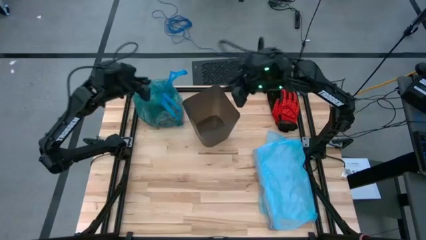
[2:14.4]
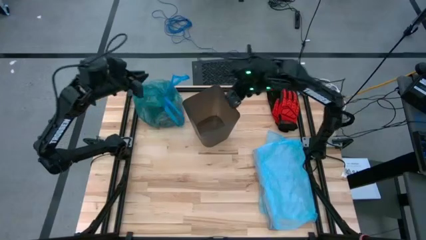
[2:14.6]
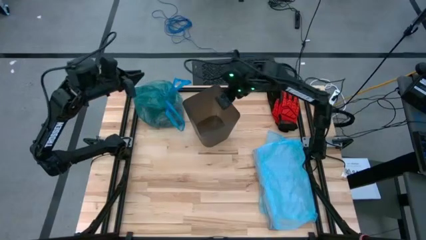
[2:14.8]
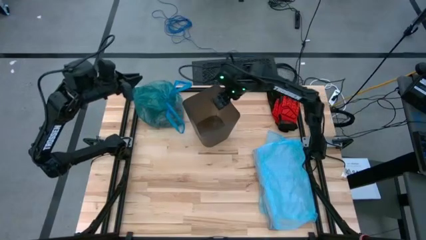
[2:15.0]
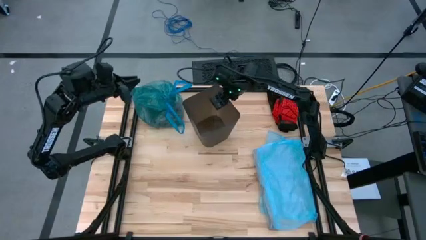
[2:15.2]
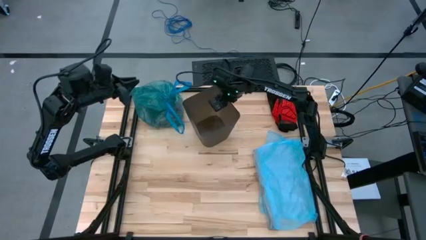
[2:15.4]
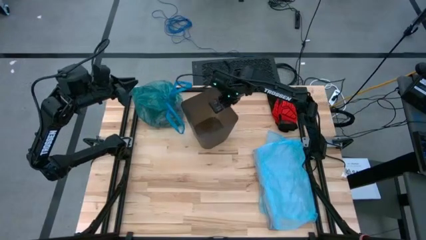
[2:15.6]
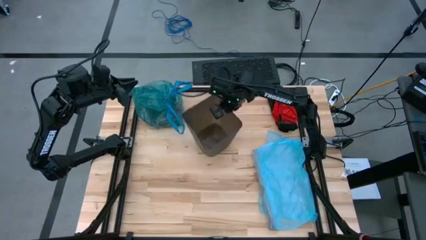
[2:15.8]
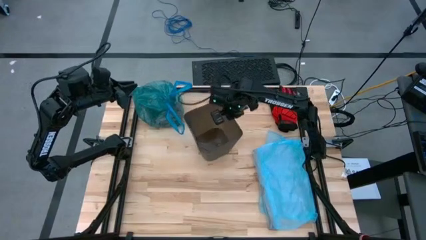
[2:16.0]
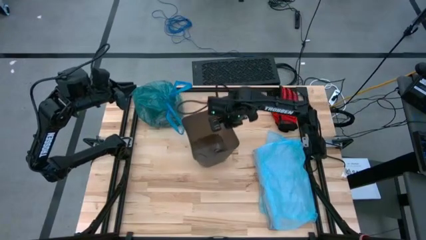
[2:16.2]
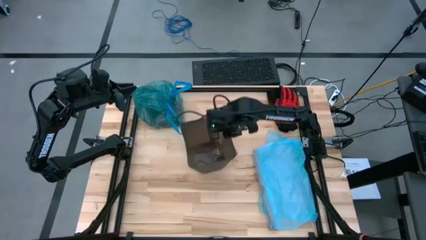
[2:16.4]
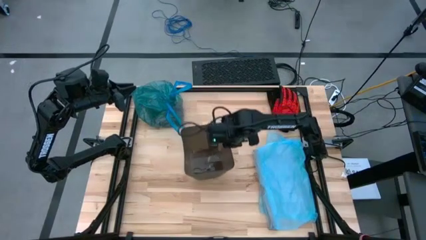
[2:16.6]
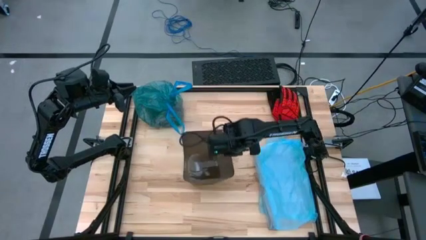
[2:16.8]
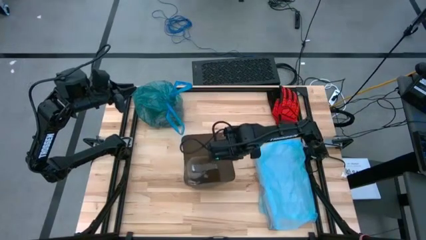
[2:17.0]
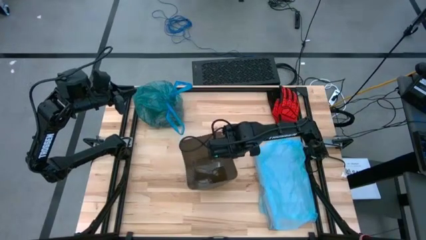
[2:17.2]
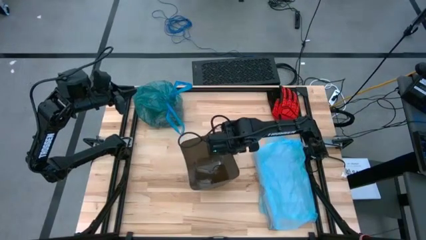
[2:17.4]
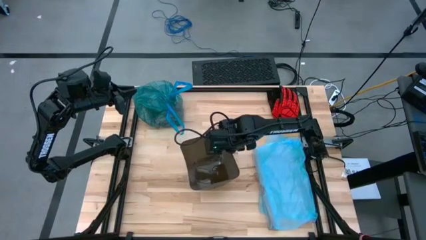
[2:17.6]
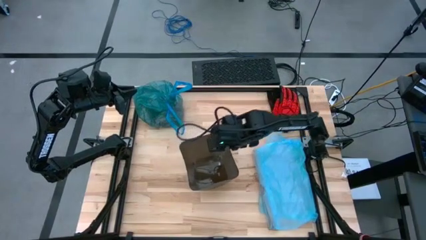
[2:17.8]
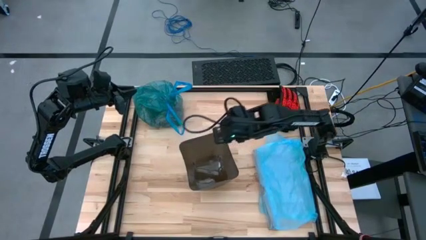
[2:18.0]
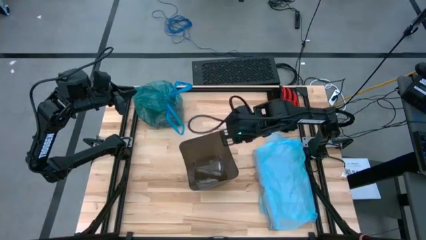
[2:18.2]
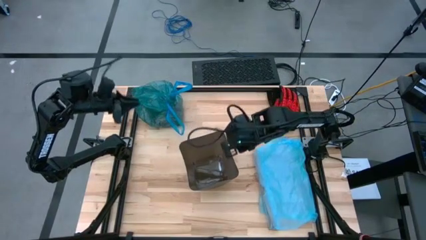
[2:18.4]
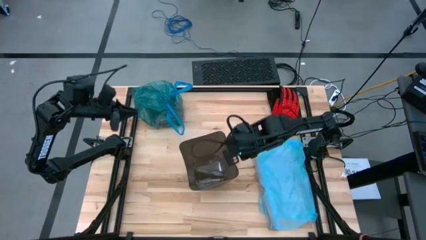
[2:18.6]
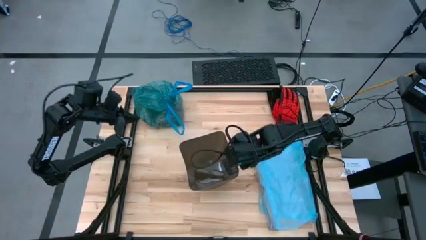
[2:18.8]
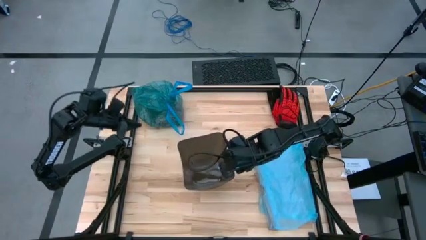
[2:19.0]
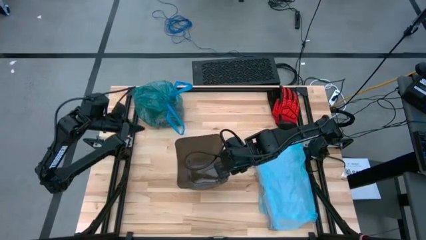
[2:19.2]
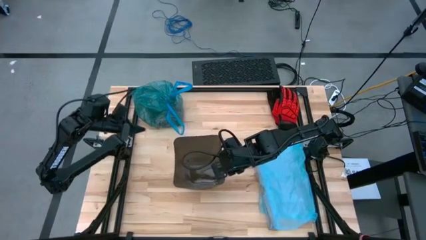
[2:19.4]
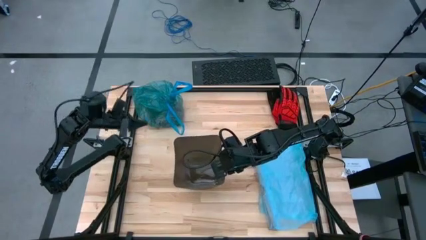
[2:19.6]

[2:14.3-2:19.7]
Task: place trash/remove bag and relplace
Move the trash bin to the center of the table

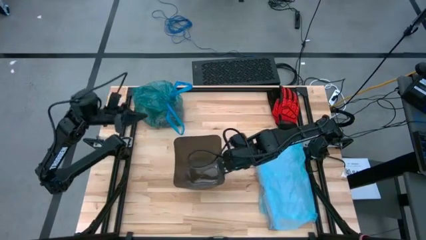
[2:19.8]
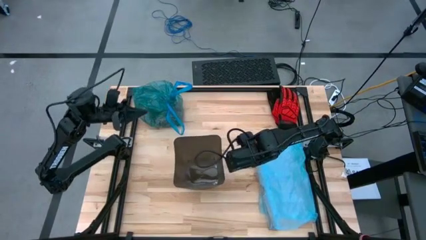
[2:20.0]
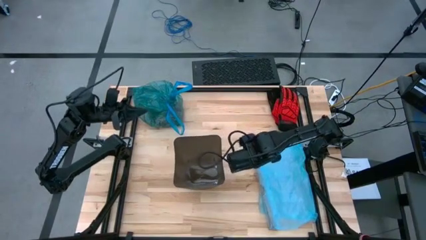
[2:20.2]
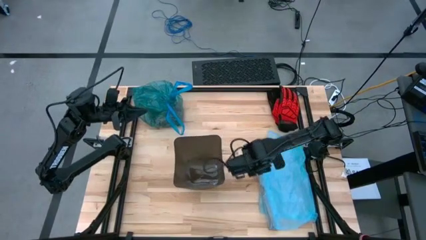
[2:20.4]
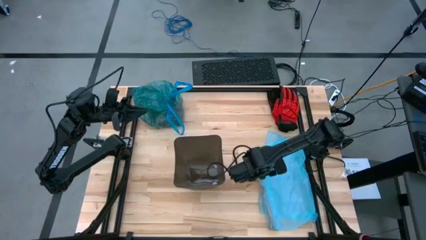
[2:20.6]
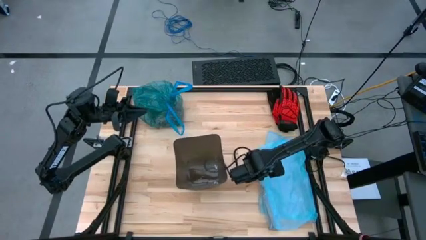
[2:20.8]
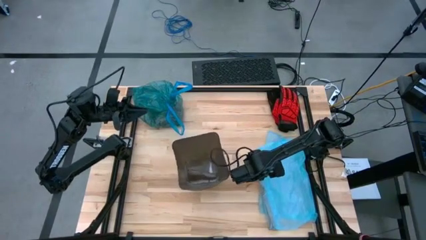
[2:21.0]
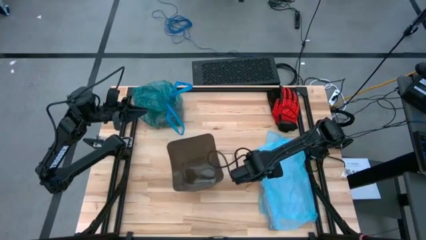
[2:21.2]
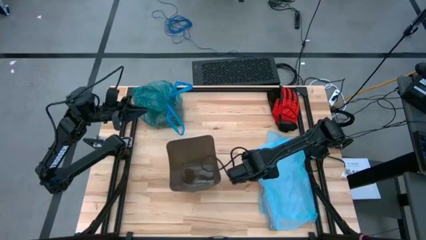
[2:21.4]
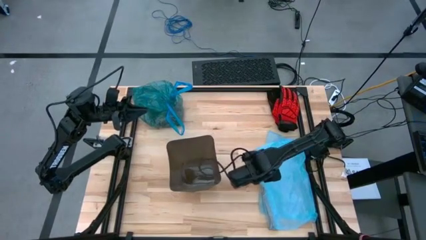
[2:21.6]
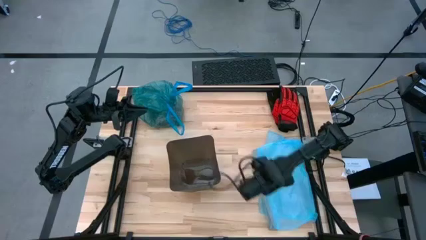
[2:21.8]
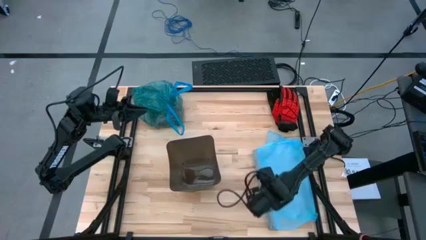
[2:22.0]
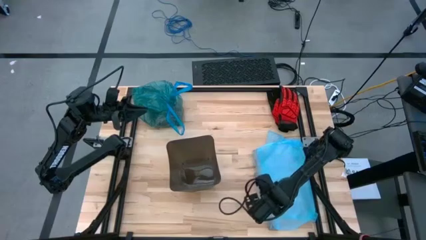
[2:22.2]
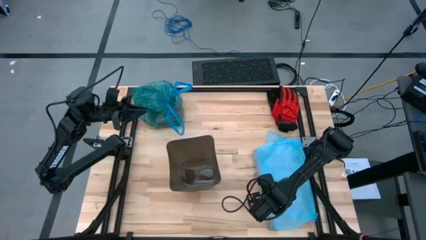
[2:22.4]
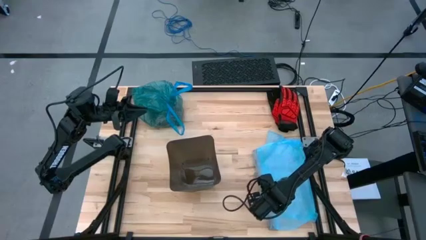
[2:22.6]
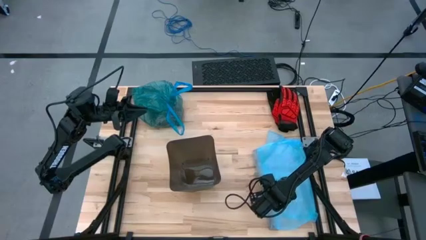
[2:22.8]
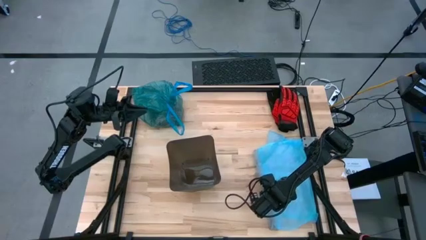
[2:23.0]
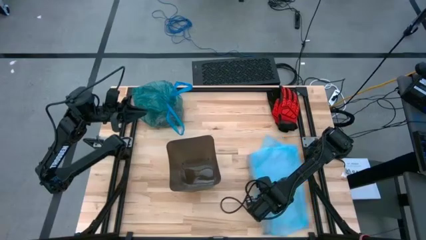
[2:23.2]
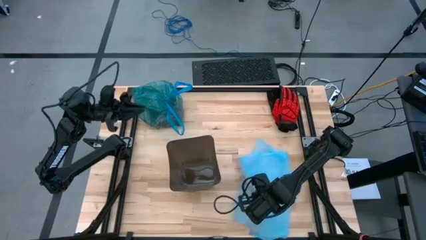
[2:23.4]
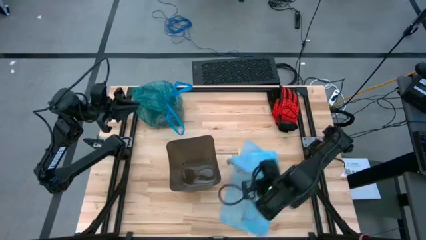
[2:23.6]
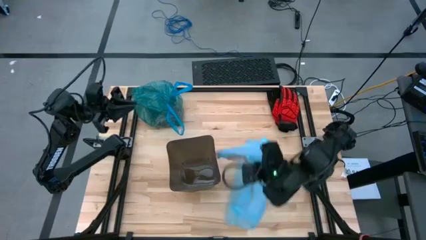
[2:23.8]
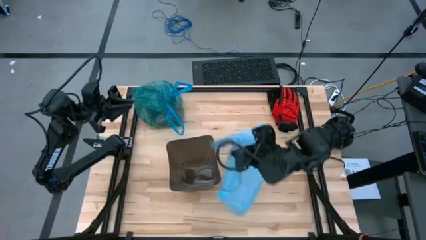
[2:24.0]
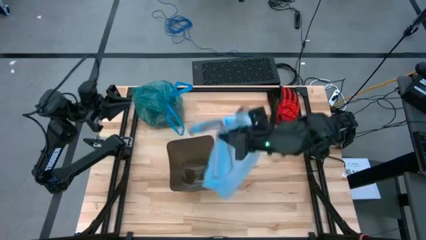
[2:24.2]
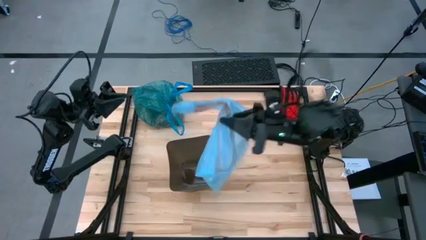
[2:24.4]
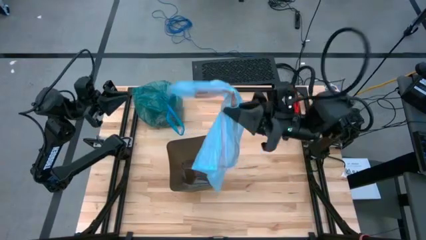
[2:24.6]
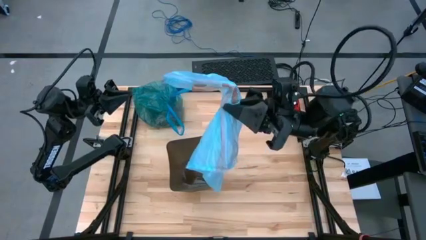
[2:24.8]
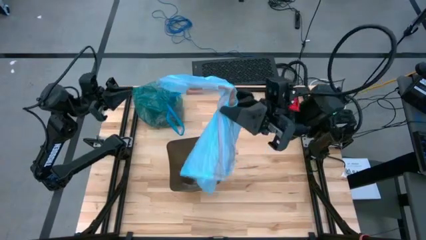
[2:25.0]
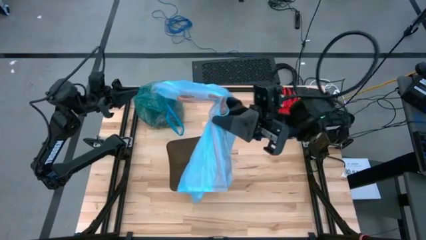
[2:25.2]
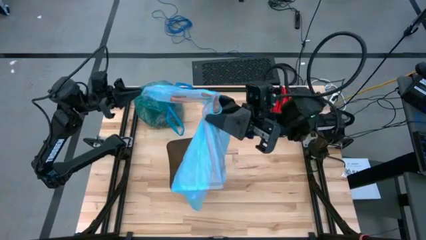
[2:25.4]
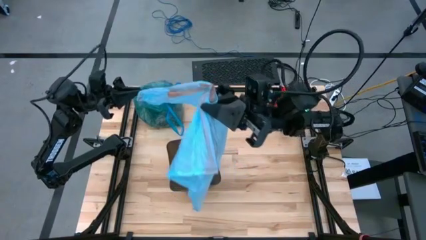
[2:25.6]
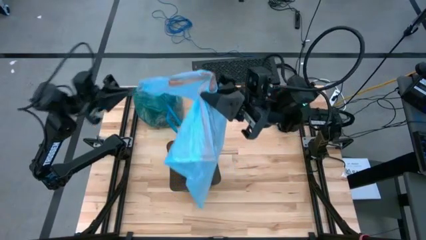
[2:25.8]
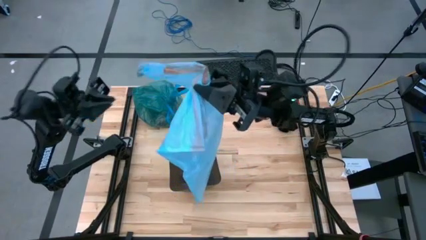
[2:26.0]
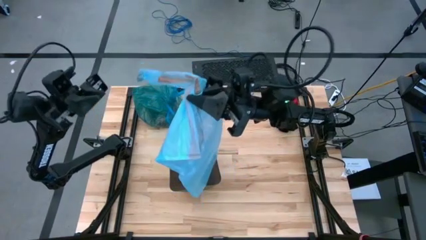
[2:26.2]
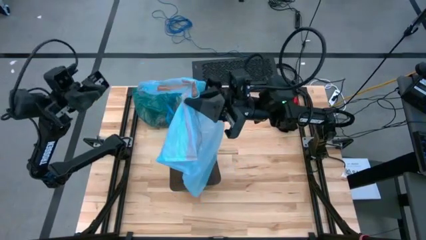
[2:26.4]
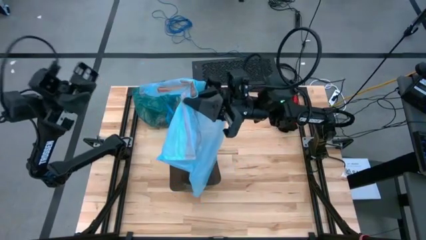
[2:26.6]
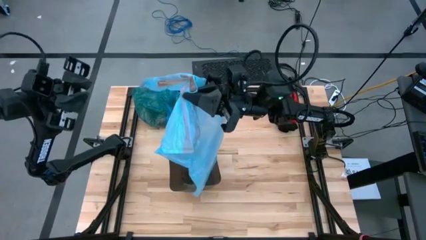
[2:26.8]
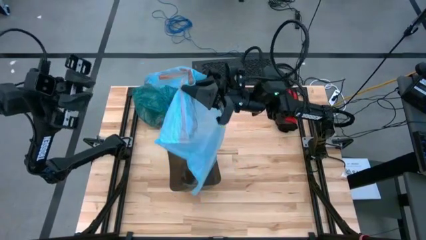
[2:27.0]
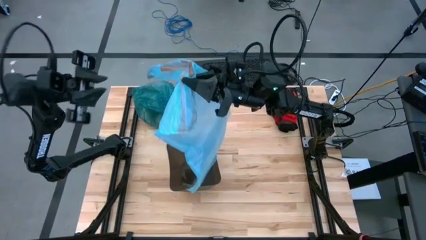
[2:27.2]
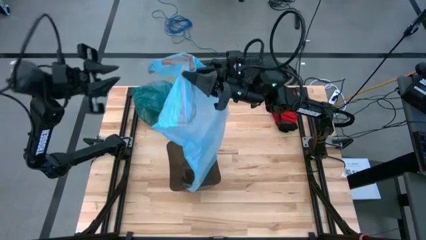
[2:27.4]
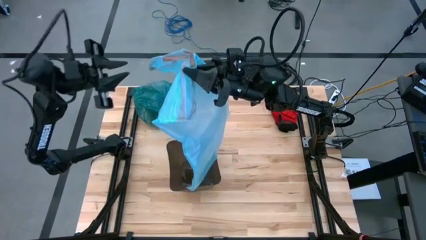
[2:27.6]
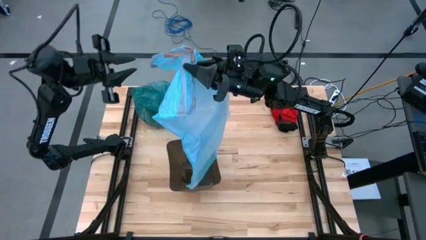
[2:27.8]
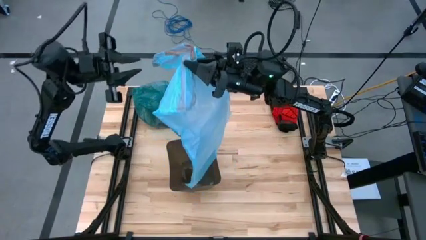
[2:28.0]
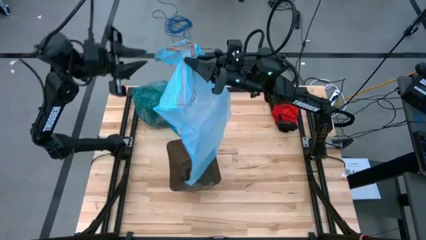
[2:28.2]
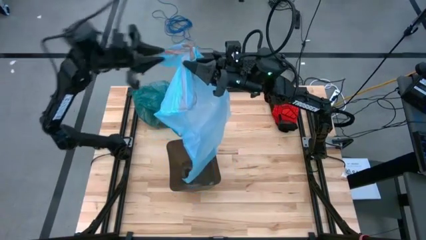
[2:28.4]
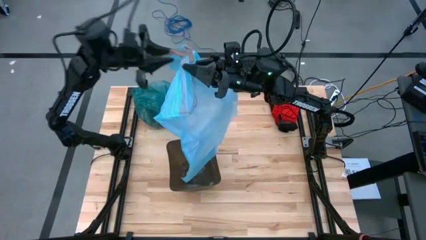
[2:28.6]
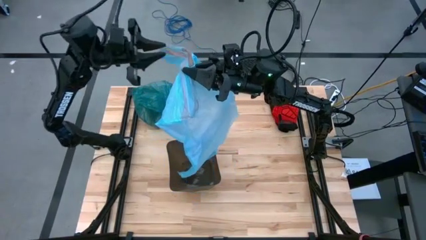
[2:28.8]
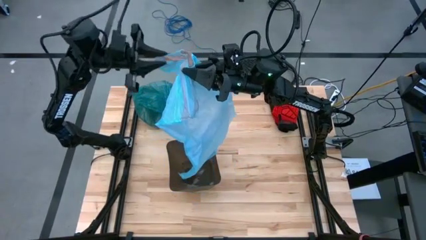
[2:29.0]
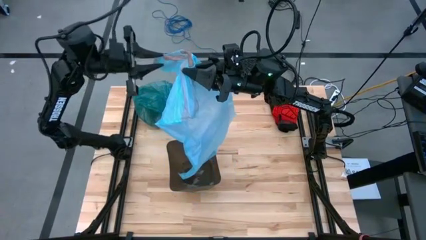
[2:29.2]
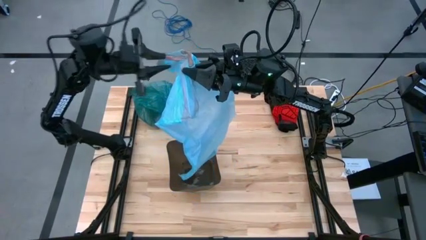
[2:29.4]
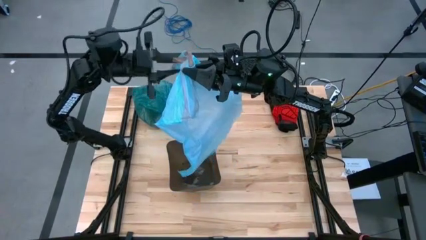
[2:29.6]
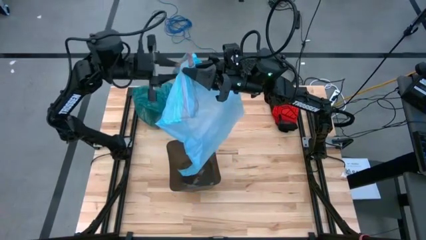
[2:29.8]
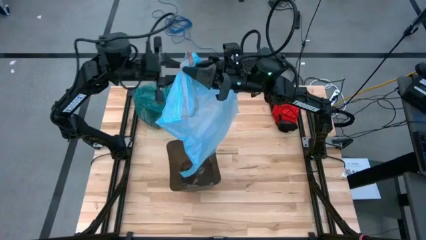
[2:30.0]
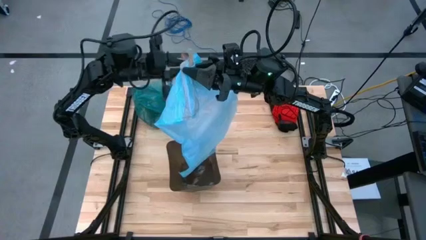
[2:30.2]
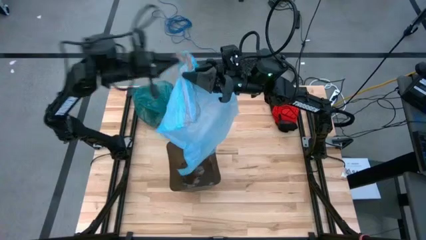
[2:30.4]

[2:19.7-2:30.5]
Insert the new blue trash bag into the trash bin

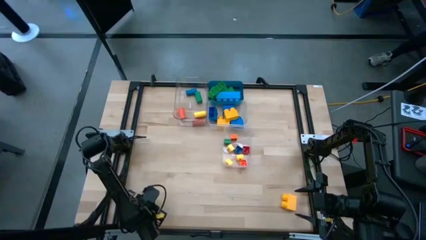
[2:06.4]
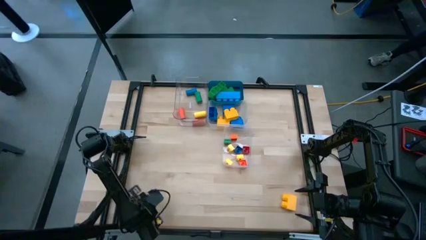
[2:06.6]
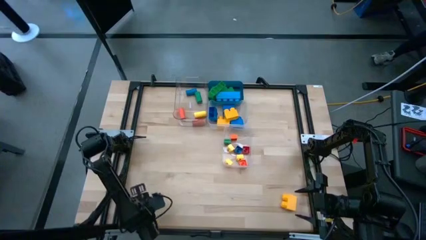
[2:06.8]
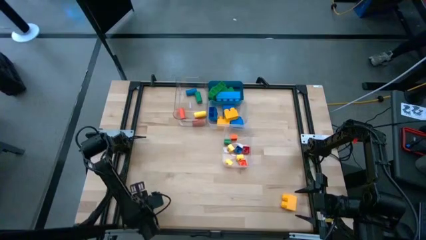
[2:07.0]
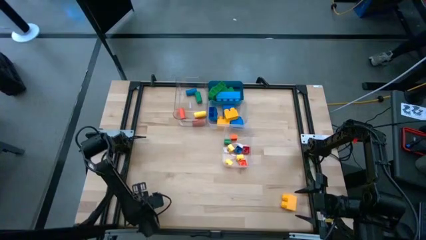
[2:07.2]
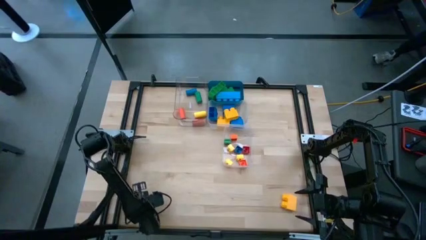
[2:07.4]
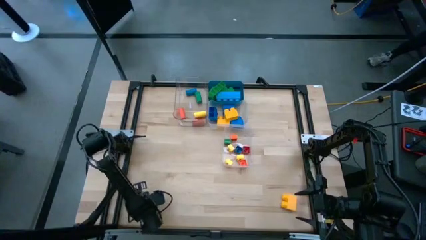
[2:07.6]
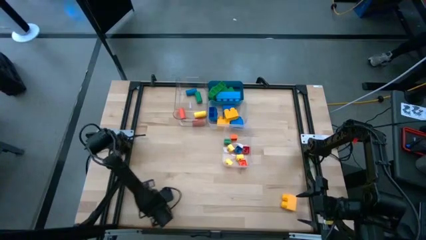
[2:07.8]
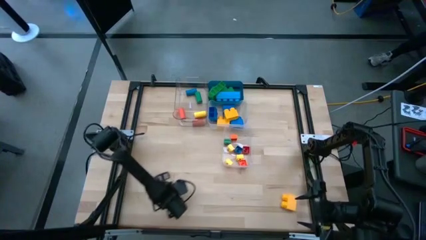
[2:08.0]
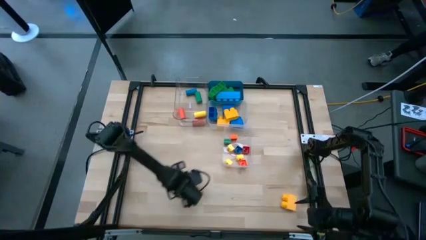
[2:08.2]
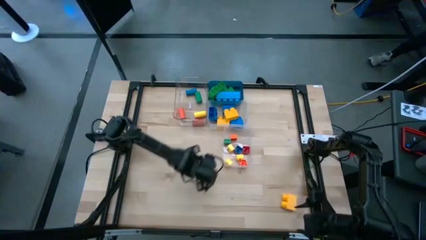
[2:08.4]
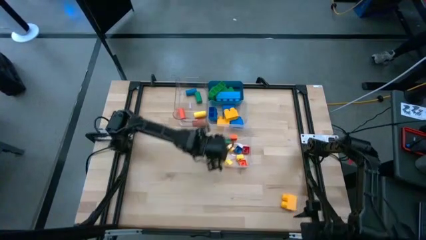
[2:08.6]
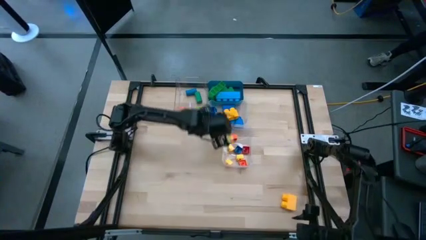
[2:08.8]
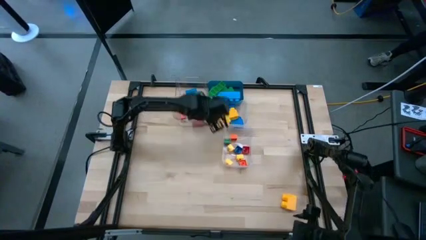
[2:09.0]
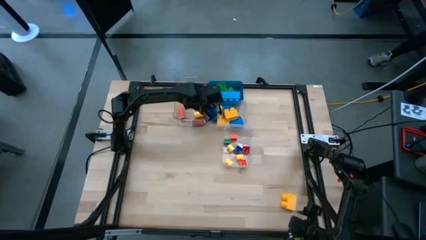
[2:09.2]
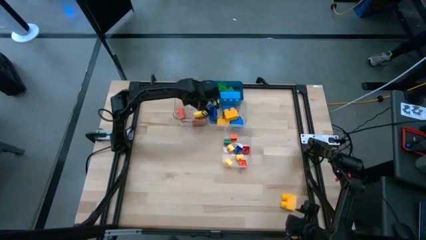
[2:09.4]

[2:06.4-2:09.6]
Task: Sort blocks by size
Put the green cylindrical block into the top left transparent bin
